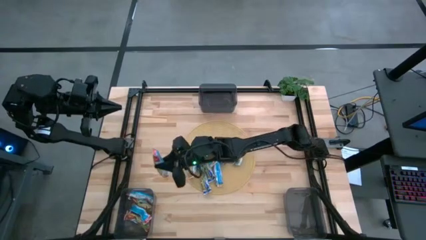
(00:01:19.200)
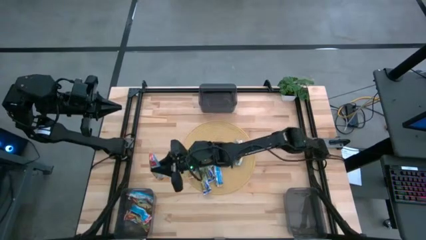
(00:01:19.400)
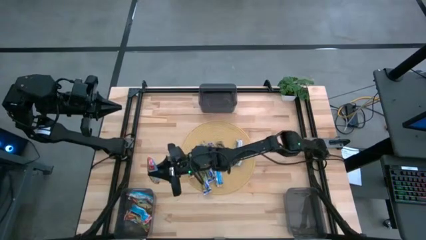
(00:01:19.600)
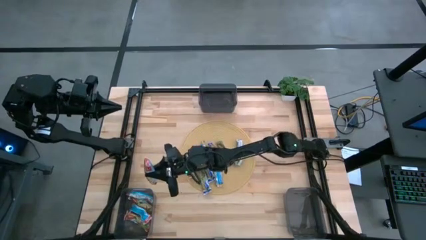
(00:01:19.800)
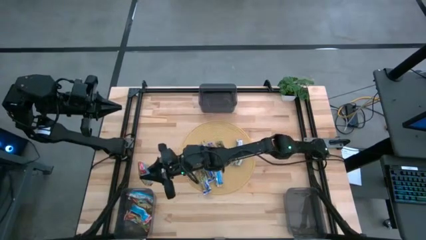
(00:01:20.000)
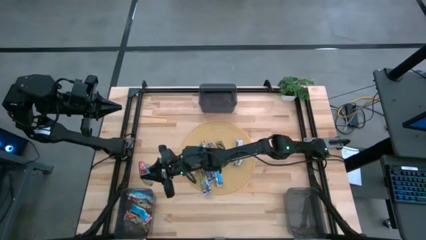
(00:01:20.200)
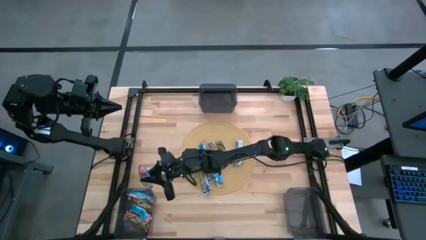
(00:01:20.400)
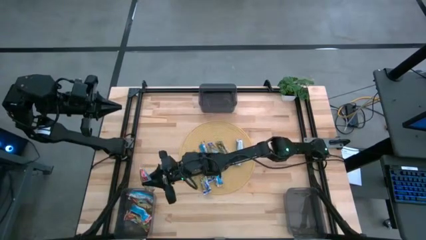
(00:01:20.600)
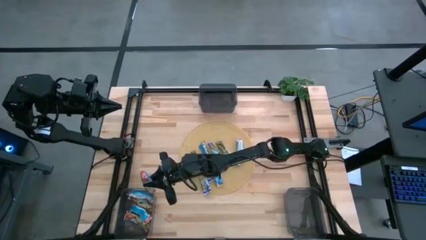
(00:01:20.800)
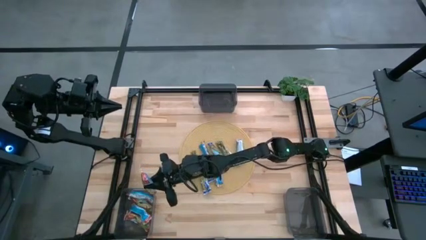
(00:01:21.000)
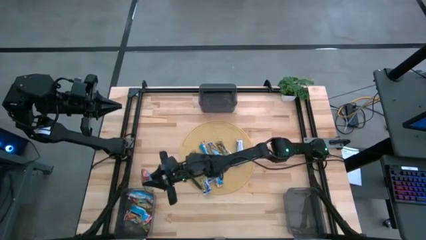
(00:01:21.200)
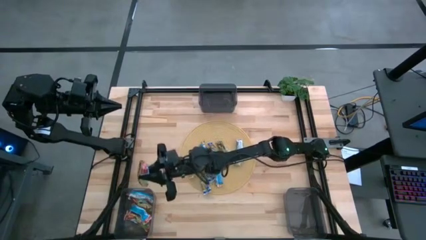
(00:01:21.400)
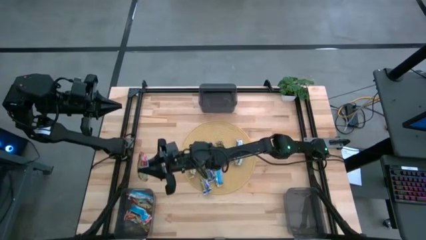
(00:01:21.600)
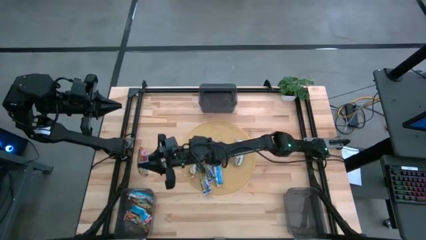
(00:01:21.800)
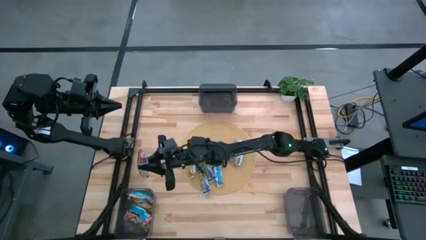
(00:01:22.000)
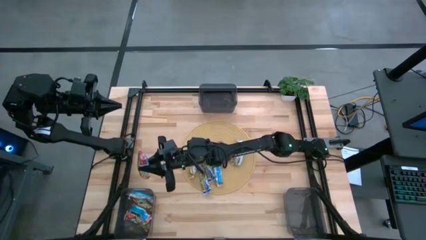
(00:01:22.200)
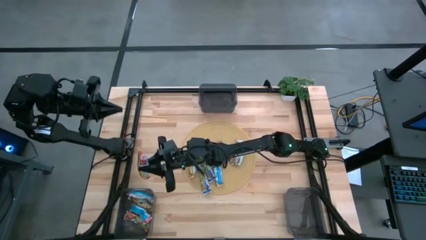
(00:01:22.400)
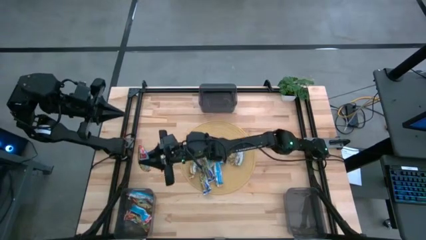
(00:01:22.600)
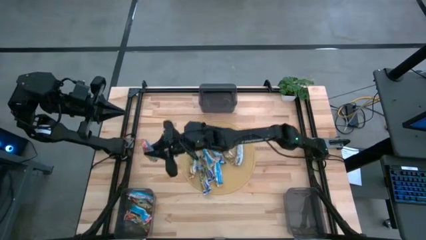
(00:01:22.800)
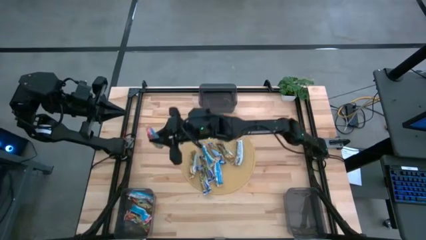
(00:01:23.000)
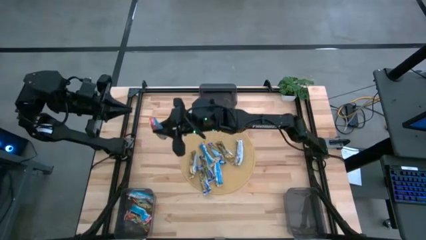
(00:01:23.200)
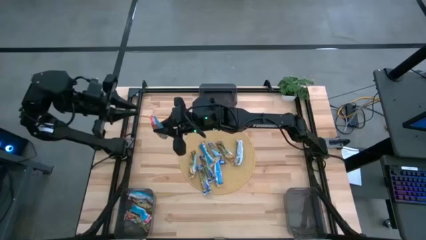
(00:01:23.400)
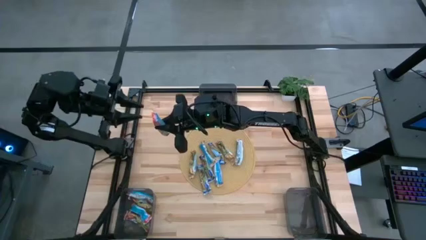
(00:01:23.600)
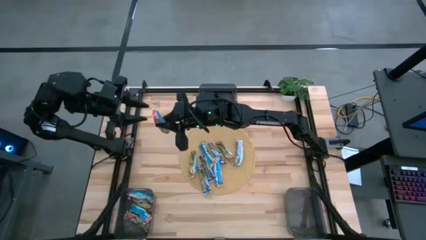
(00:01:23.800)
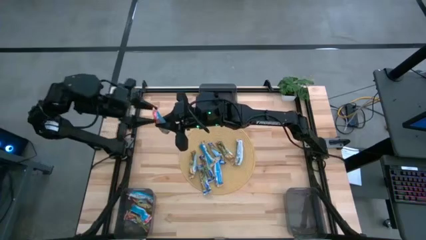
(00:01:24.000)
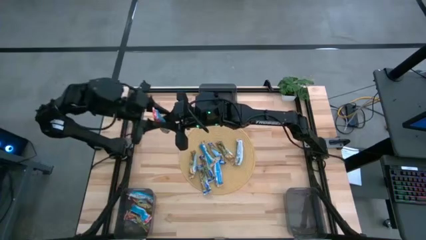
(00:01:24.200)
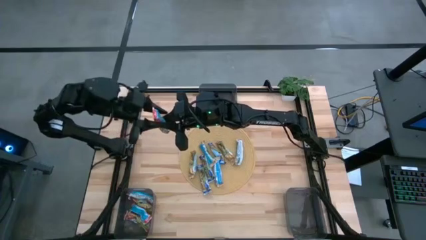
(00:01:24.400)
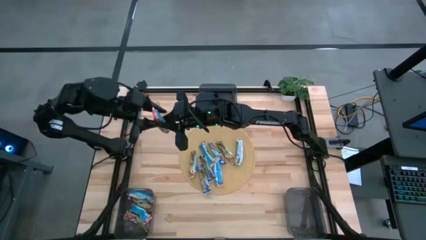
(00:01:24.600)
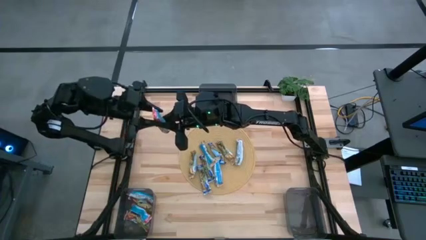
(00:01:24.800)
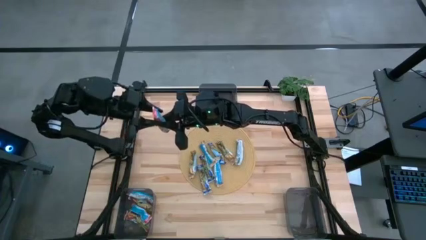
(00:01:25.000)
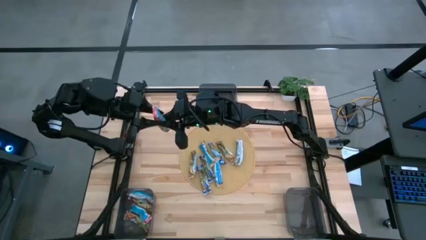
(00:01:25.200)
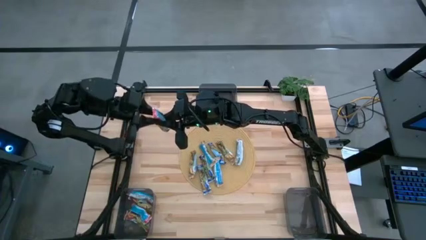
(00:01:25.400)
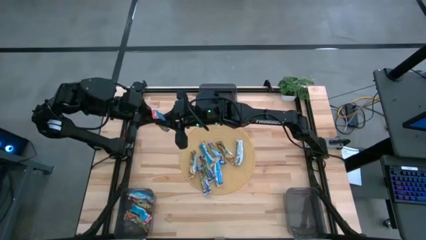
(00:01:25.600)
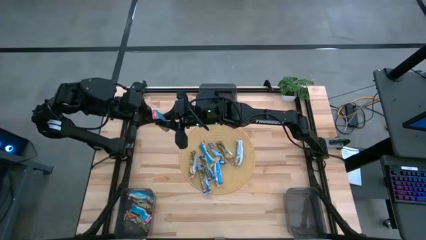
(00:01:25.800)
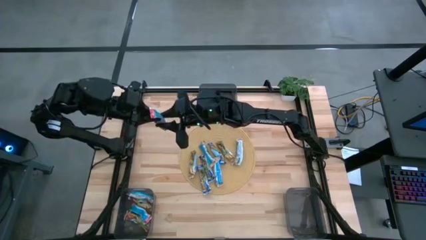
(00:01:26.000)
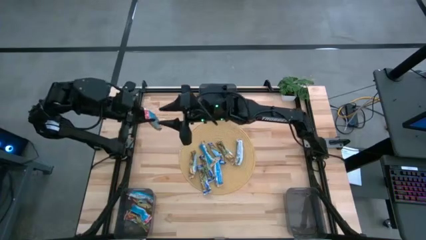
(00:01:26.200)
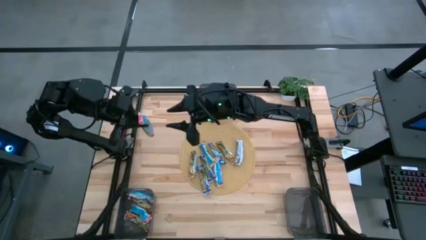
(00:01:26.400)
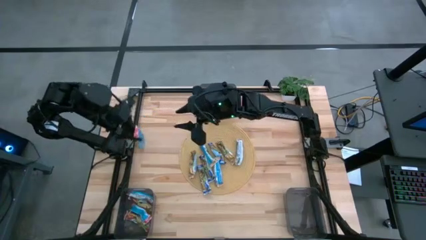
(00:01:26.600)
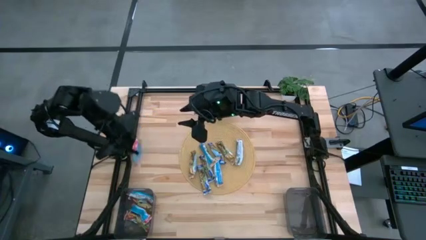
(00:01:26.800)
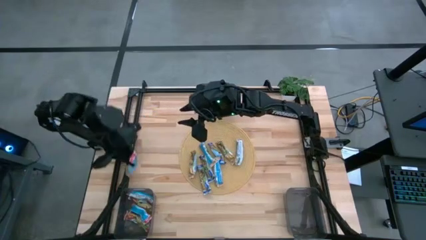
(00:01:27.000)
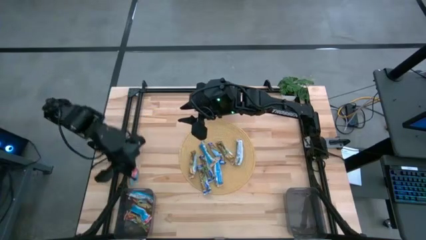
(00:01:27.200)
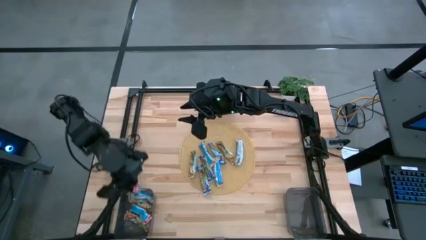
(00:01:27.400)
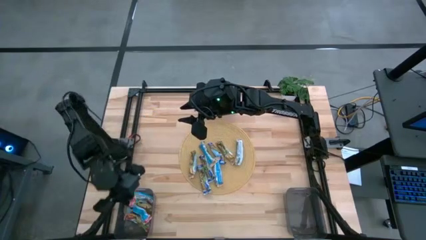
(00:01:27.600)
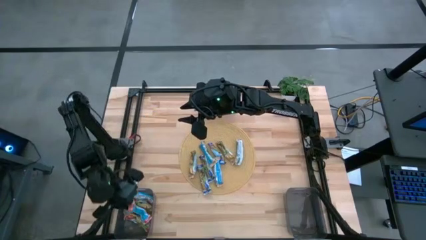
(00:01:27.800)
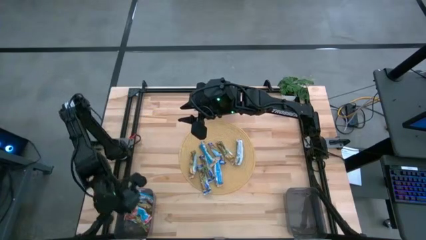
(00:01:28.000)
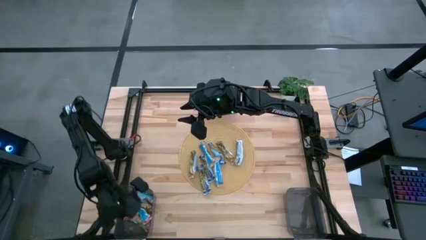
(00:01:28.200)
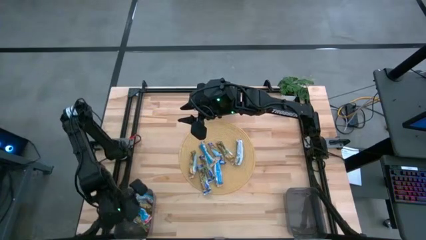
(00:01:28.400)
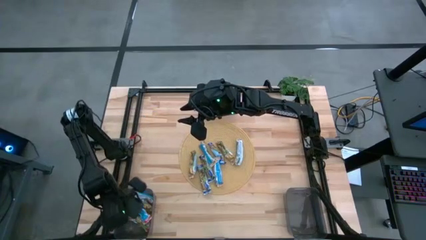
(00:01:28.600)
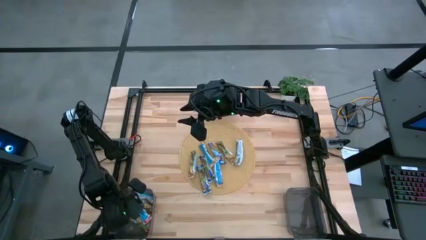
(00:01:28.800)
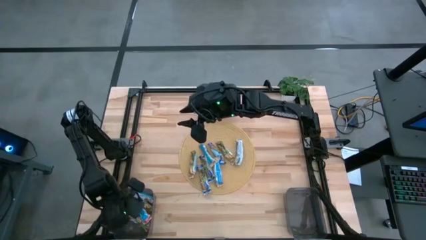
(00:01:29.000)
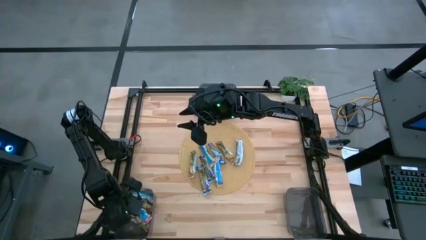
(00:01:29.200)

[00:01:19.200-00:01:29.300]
Task: Pick and place Granola Bars by type
Put the red granola bar into the left black bin

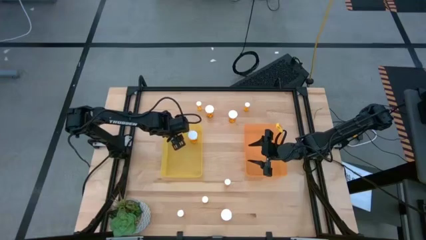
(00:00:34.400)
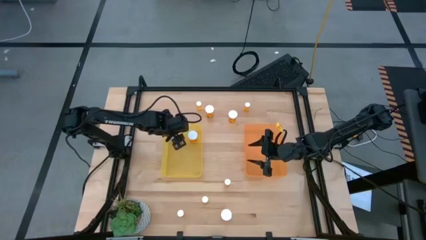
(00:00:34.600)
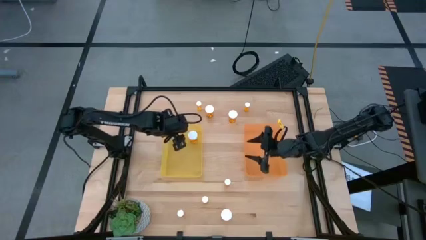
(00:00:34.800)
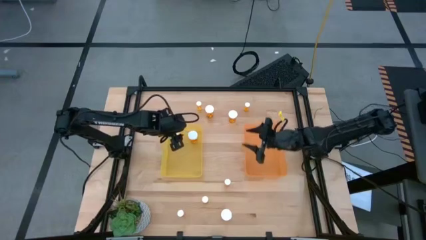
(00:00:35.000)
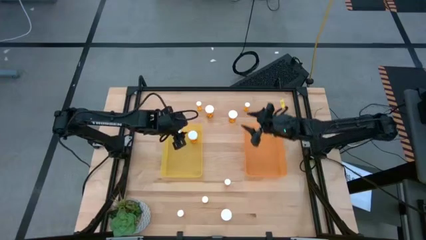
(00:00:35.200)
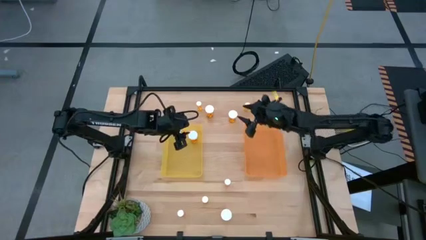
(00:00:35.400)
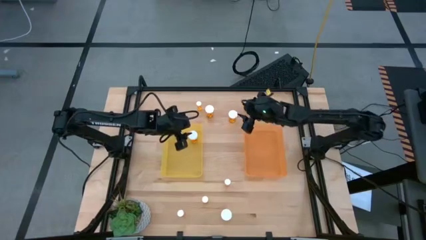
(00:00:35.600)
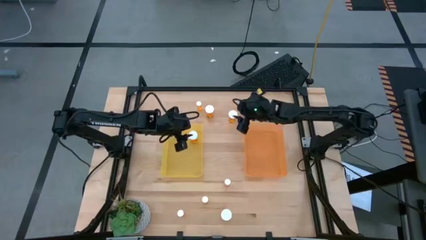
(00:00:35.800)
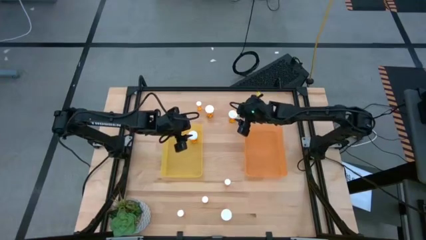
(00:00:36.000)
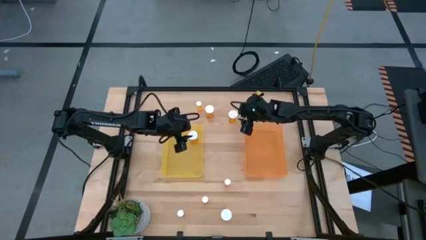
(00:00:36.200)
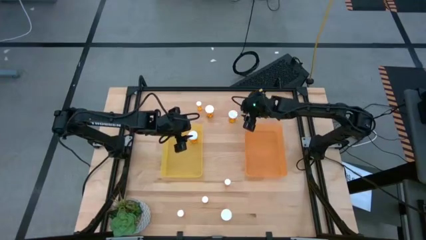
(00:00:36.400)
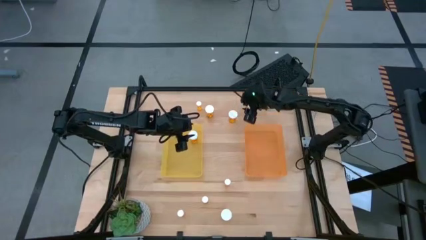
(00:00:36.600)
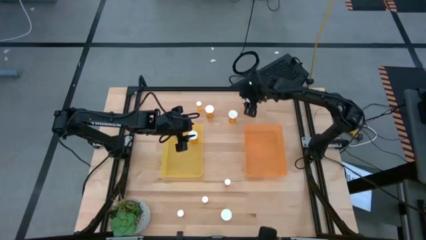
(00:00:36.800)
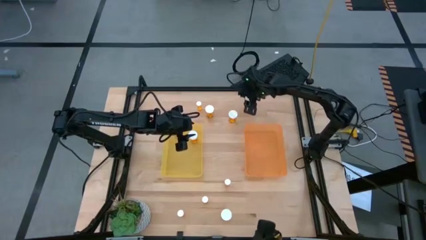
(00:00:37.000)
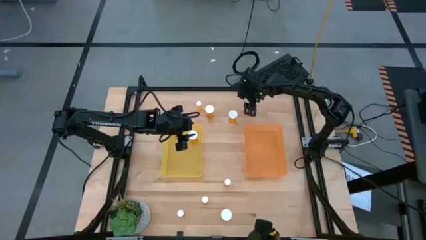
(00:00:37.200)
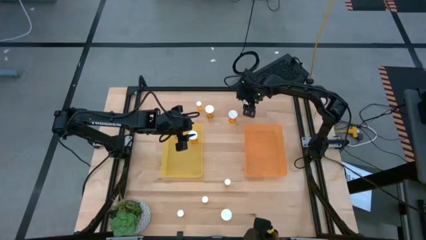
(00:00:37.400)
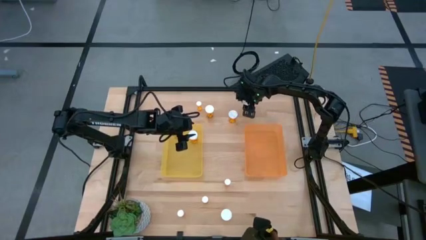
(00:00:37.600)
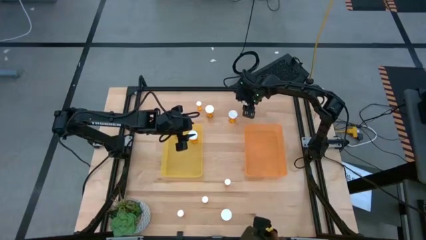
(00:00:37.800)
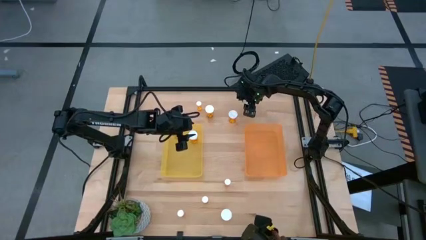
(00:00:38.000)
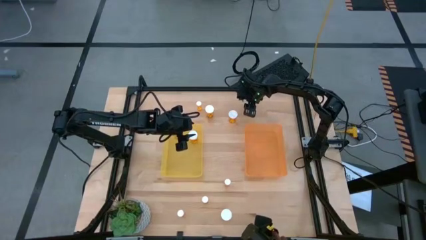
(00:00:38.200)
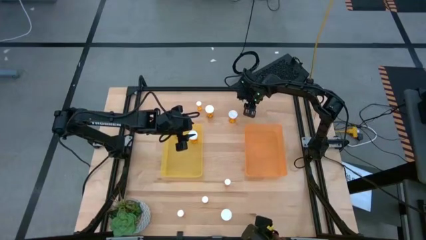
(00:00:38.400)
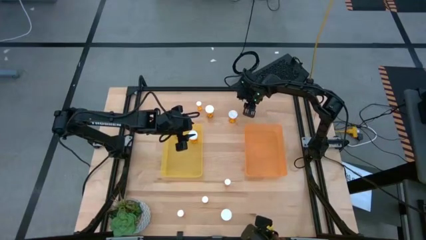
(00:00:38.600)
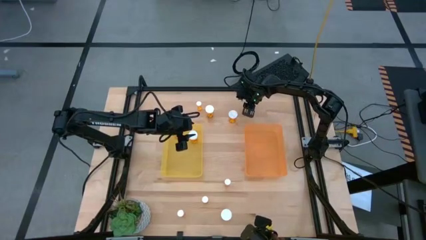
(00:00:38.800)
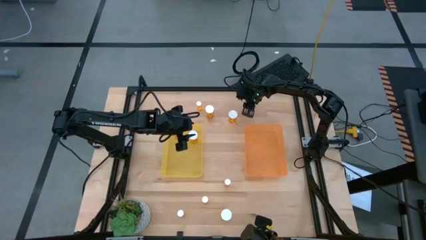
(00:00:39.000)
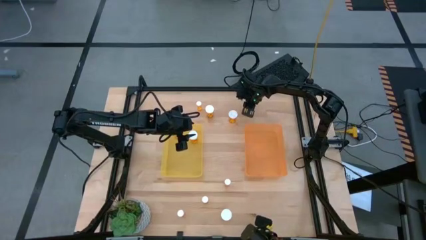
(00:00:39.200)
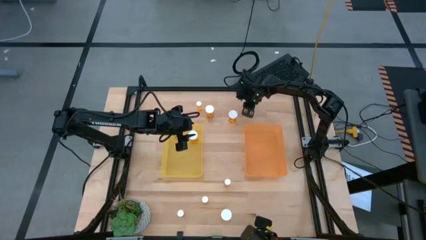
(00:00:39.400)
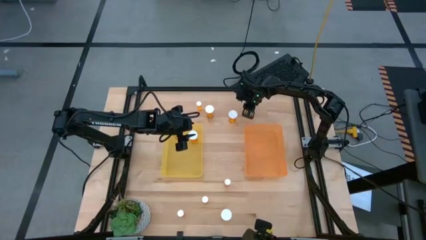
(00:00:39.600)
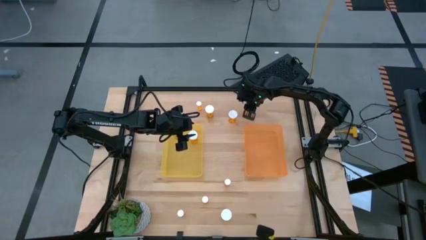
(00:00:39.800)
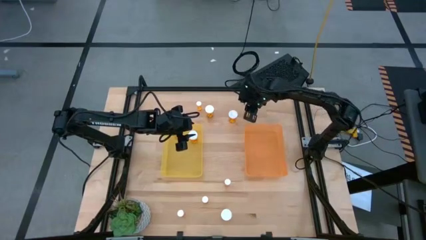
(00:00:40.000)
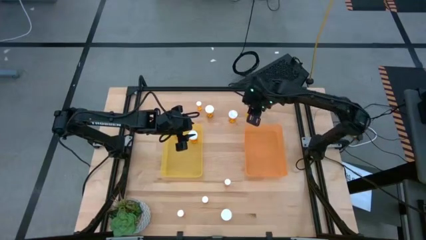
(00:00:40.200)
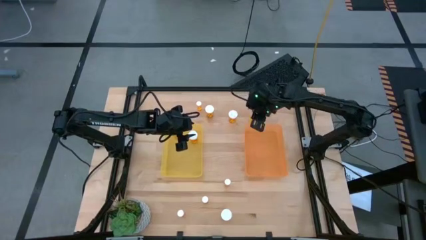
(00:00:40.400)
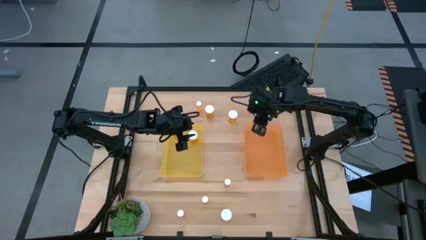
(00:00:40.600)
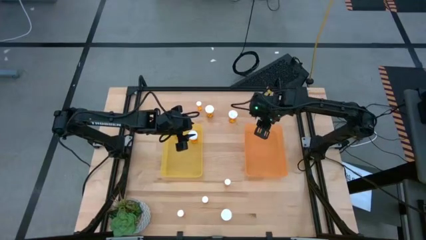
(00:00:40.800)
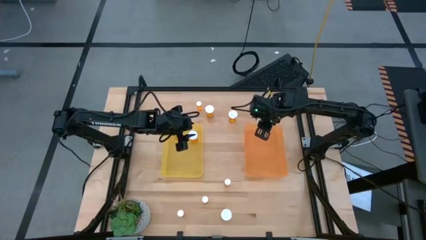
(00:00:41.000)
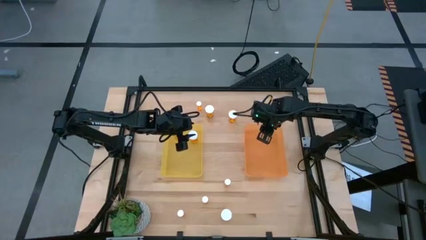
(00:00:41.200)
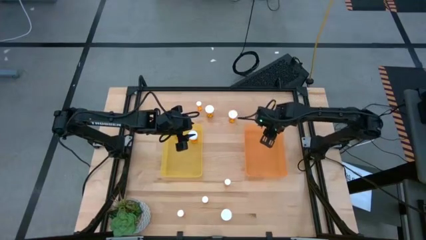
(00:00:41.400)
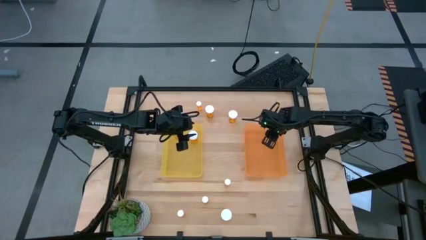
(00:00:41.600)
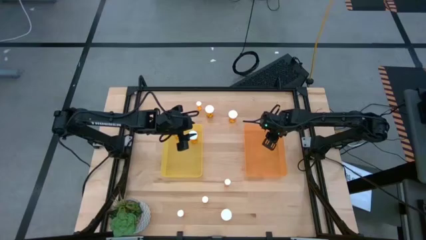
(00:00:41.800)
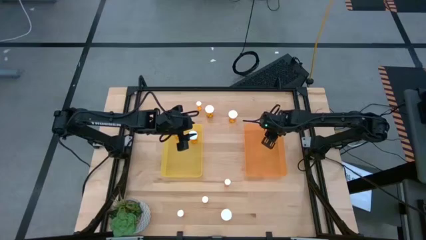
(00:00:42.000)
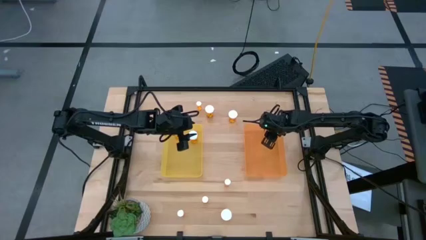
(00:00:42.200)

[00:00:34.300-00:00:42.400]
Task: Pick and place medicine bottles into bin by pill shape (circle, oval)
Put the small orange pill bottle into the orange bin
